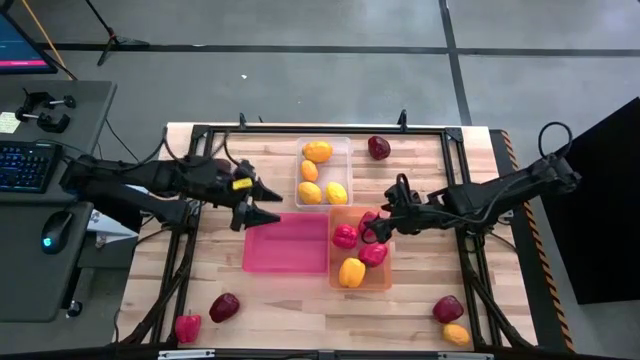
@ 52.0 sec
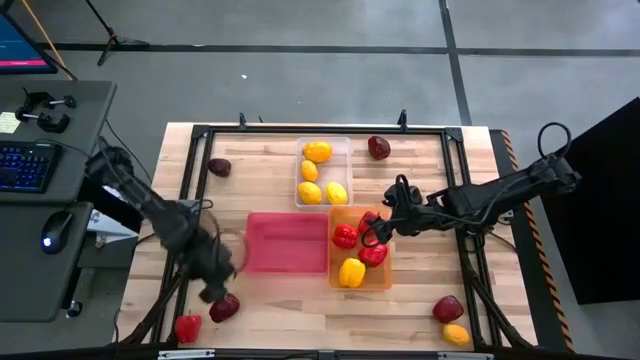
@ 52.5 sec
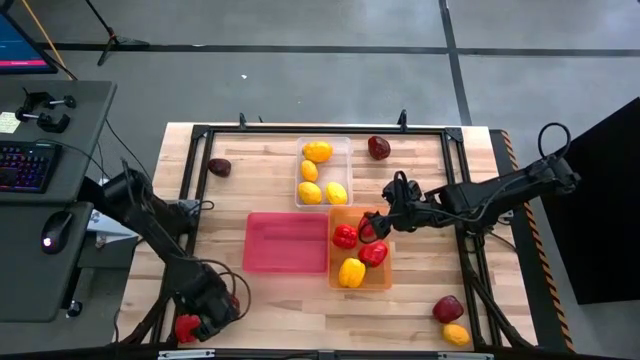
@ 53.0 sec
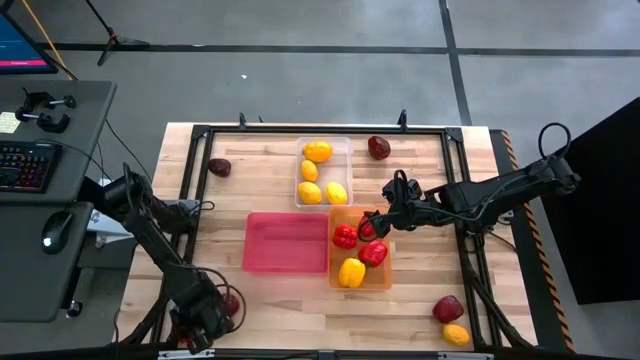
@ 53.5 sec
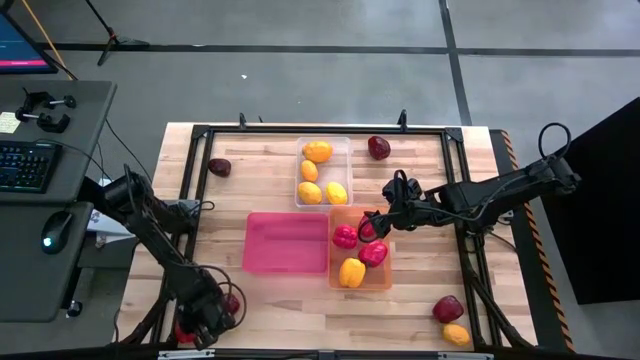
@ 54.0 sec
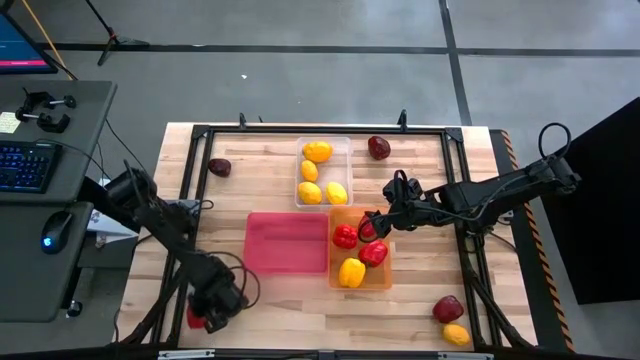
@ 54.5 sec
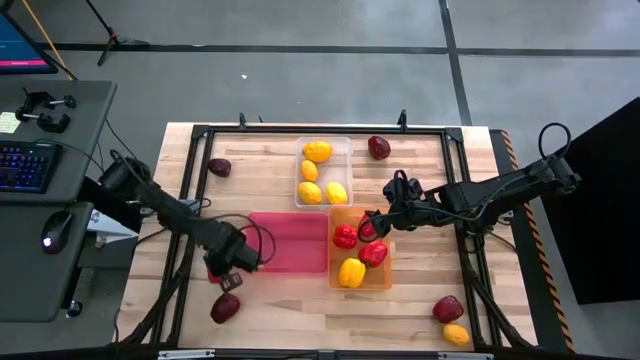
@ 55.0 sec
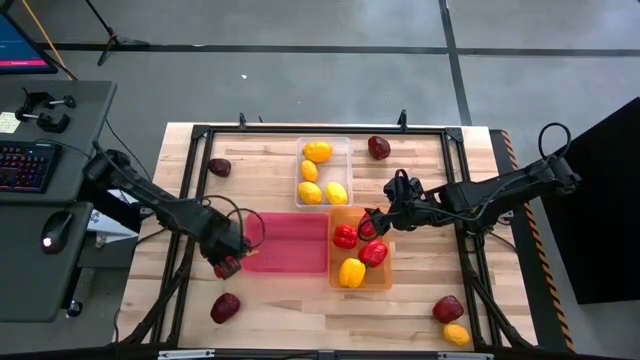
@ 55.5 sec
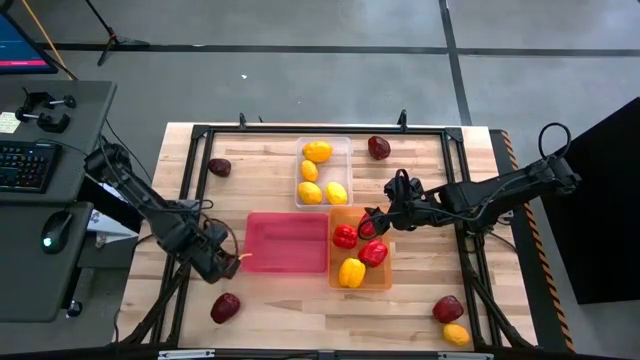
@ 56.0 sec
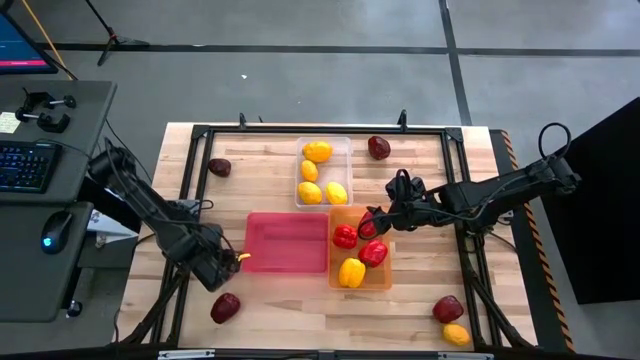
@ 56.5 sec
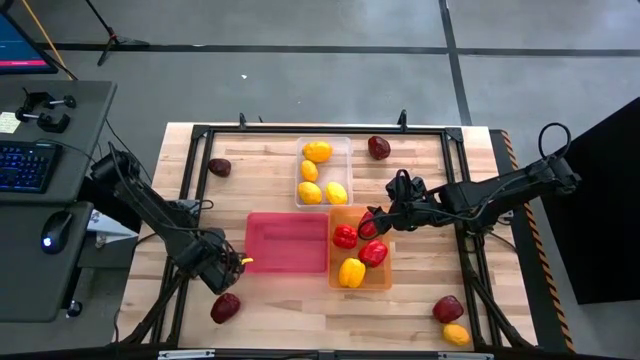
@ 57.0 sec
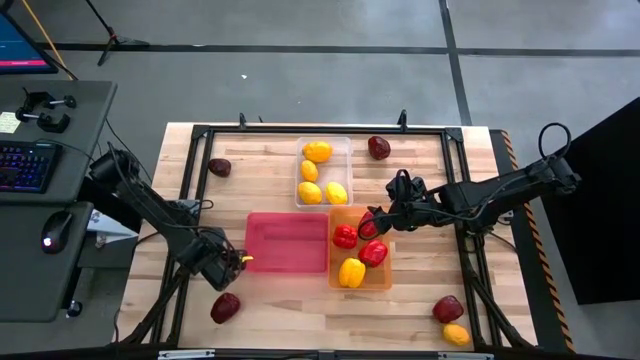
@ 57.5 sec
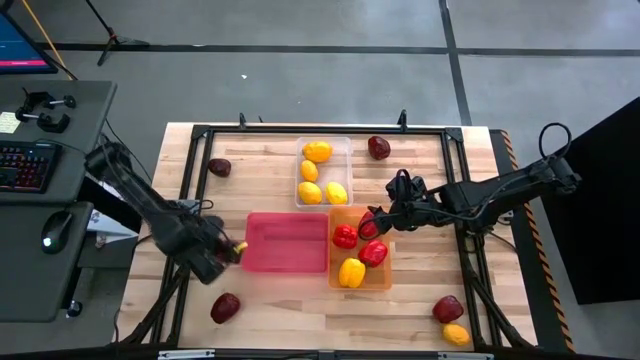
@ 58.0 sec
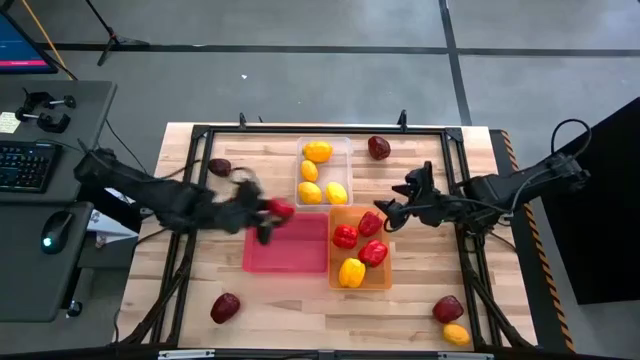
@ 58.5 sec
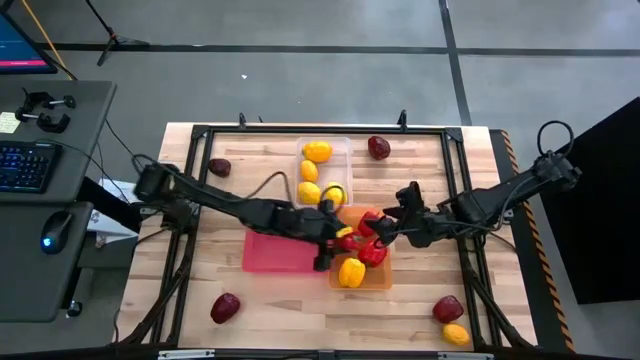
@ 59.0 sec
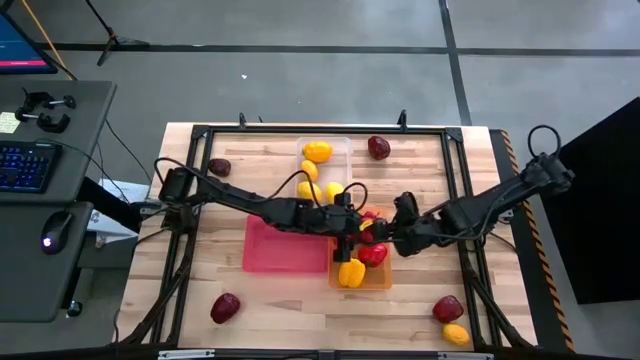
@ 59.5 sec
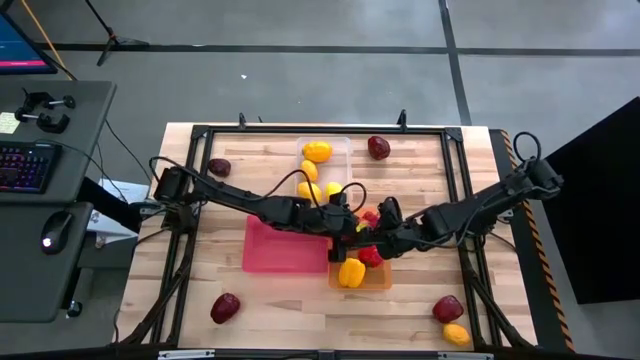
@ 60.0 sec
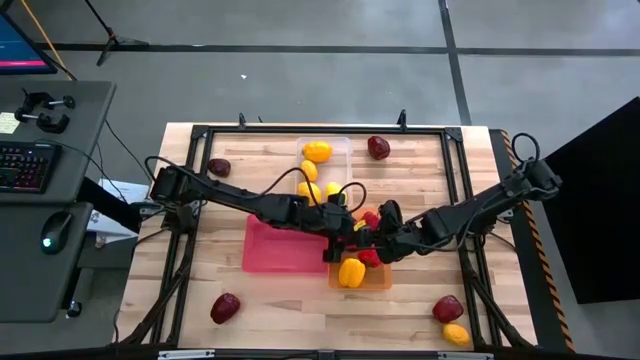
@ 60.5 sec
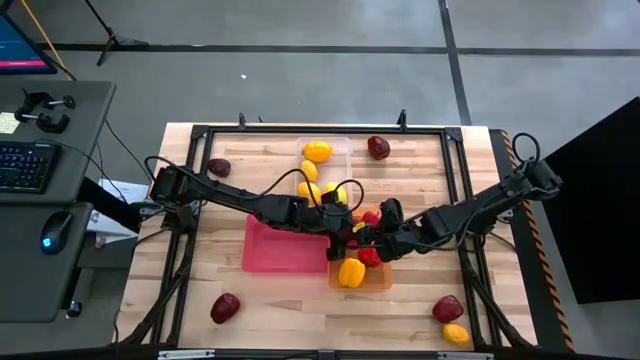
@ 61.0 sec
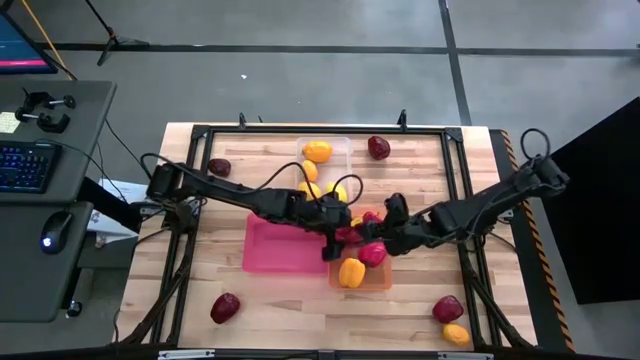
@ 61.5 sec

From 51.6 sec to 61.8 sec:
Task: Sort produce into baskets
Put the red bell pepper into the orange bin

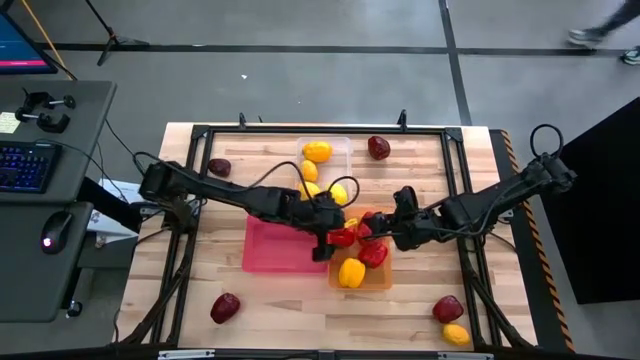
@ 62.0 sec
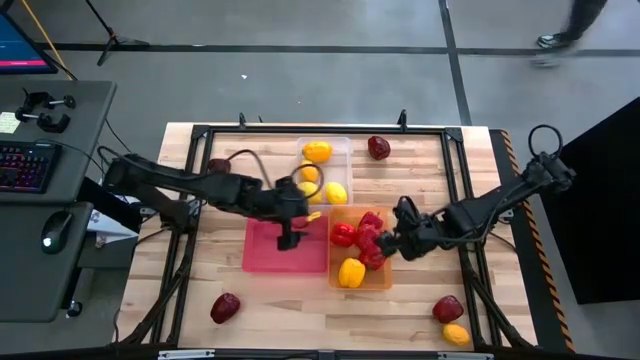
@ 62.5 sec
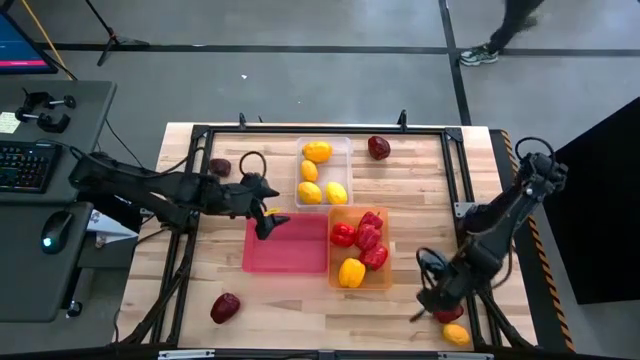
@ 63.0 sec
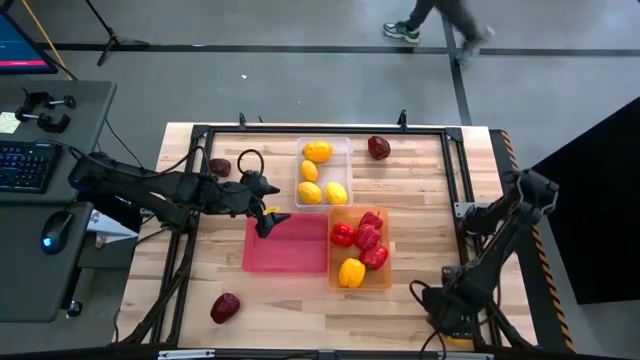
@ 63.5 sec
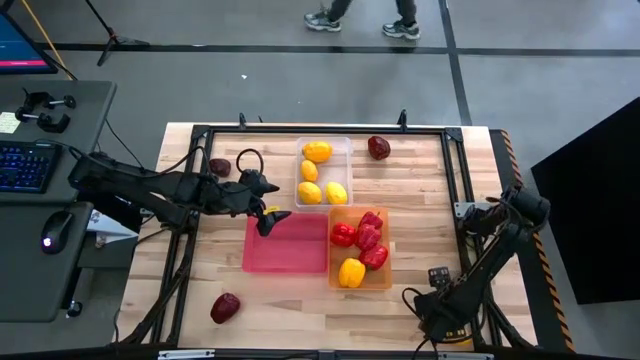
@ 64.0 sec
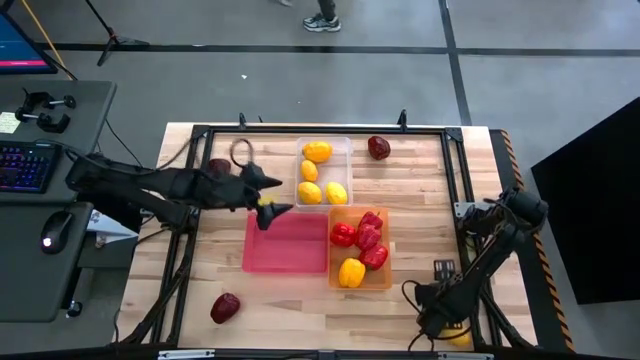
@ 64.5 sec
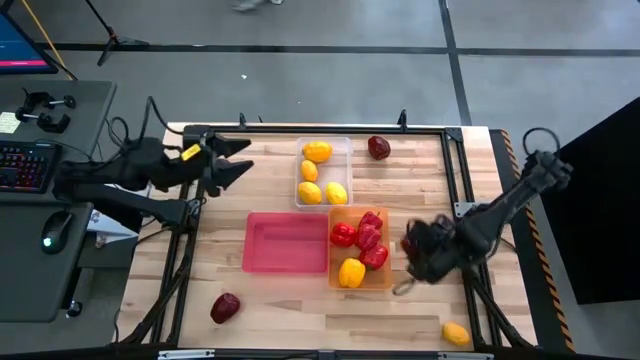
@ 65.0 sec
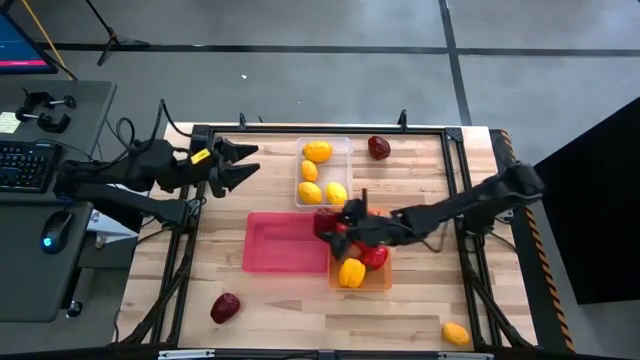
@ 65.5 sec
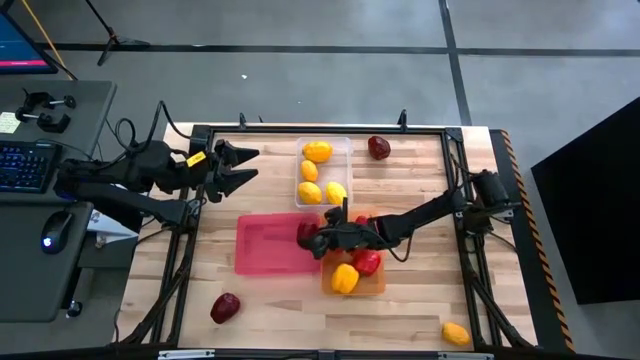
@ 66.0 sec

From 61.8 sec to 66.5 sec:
Put the apple into the red bin

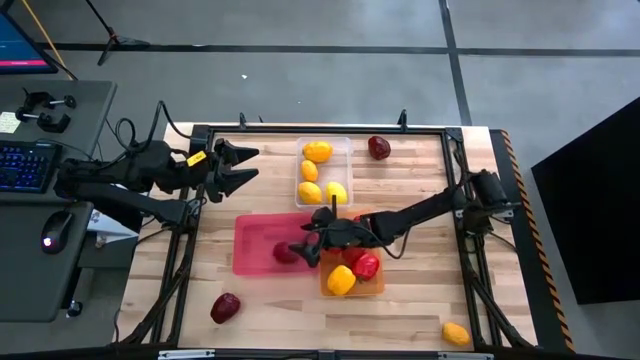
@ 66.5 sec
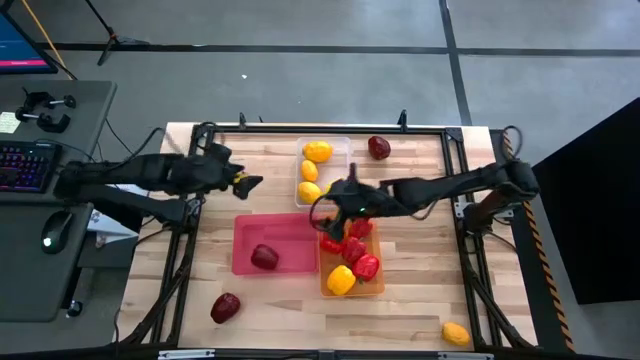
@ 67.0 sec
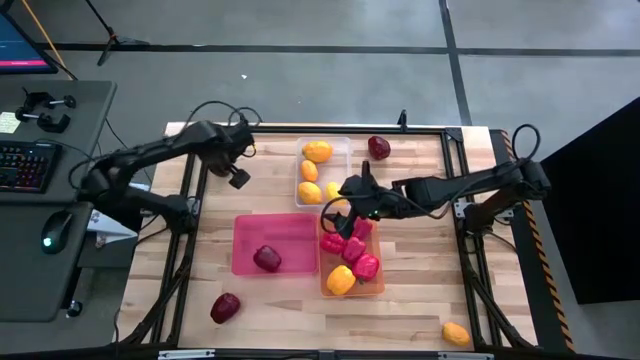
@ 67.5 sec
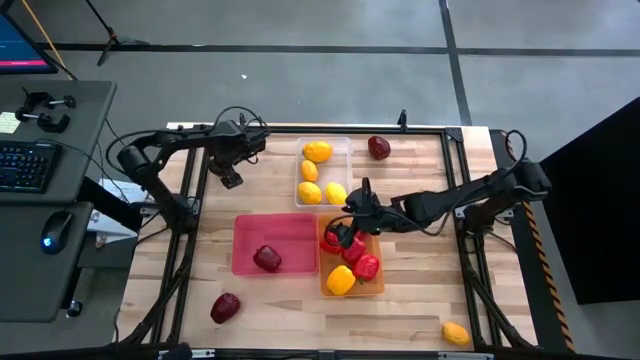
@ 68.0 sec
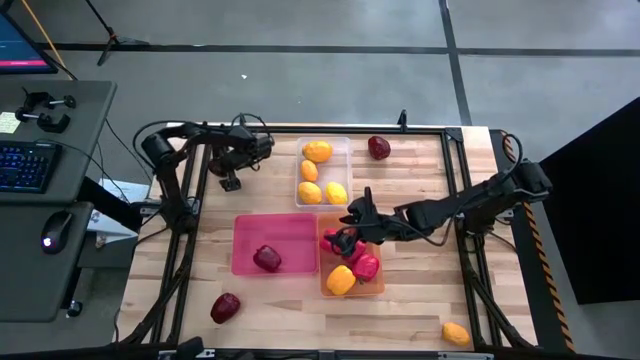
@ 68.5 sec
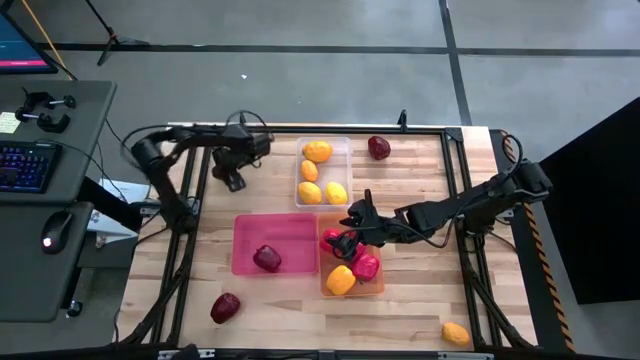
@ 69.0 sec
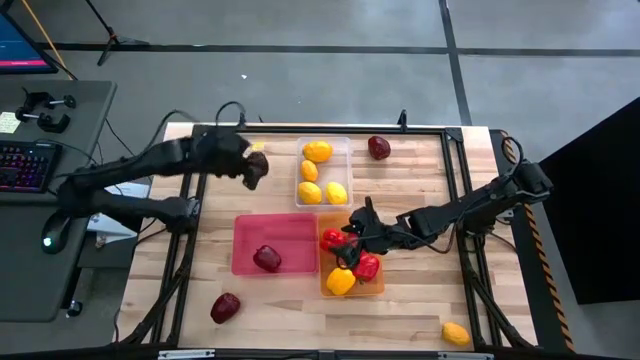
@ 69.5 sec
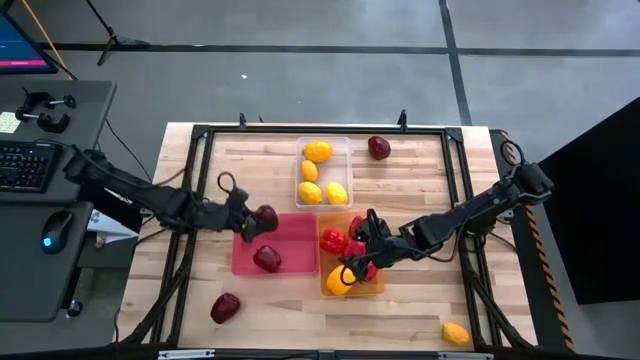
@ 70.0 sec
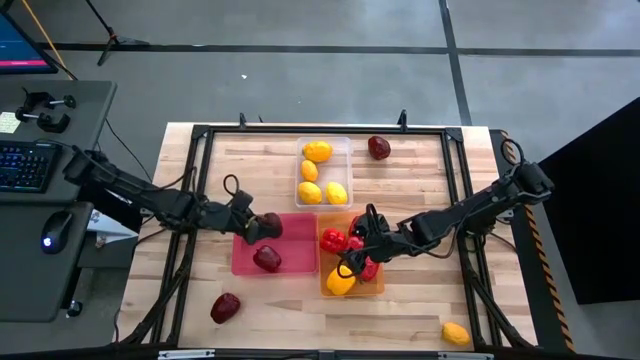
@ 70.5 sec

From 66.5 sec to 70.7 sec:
Put the apple into the red bin

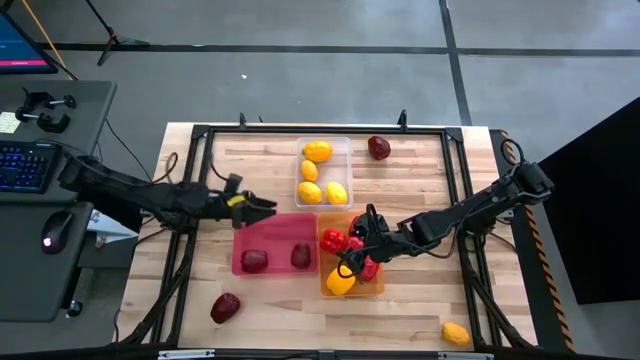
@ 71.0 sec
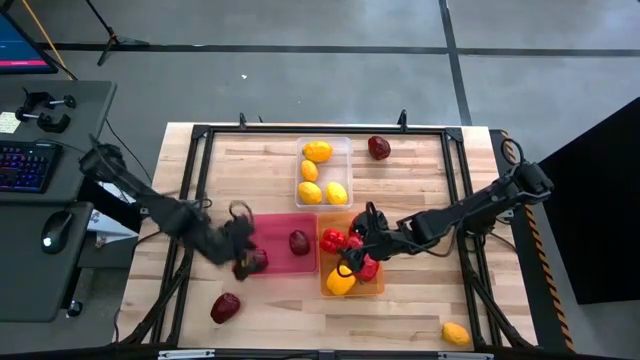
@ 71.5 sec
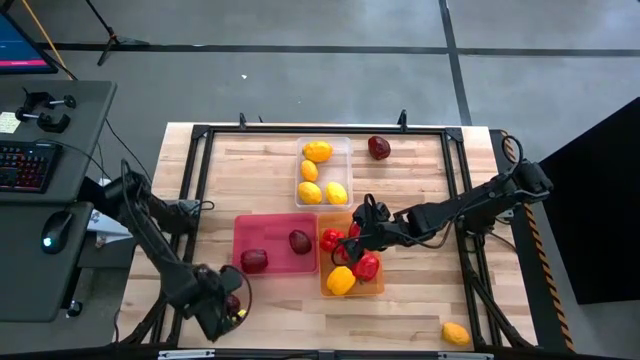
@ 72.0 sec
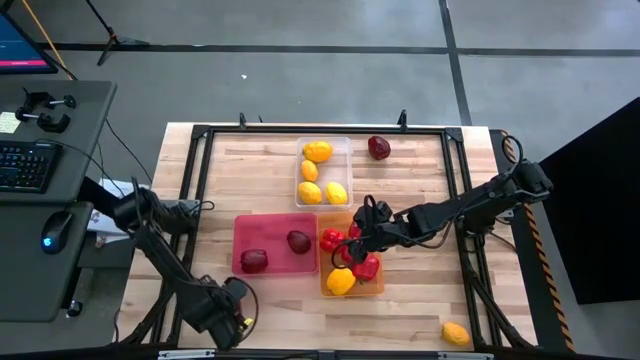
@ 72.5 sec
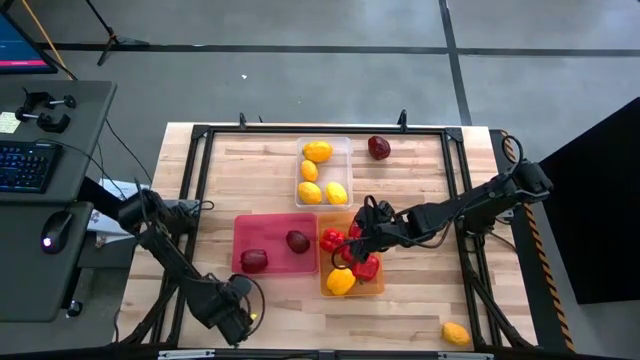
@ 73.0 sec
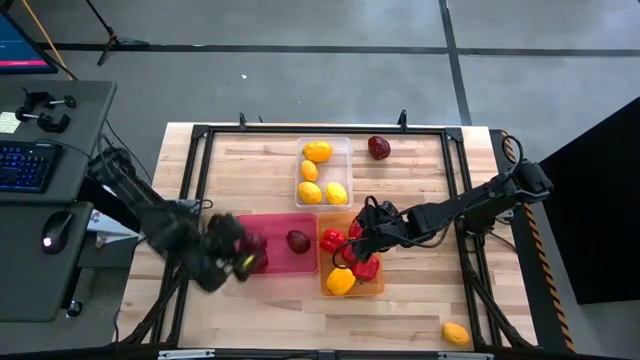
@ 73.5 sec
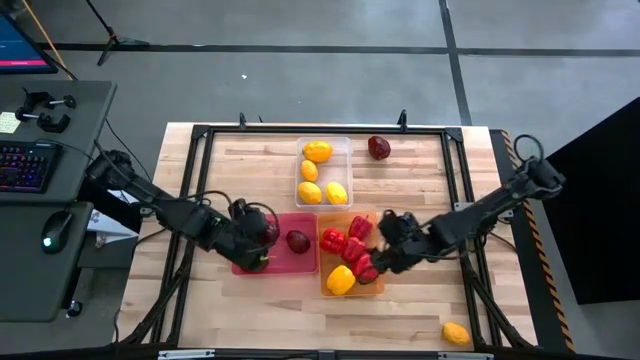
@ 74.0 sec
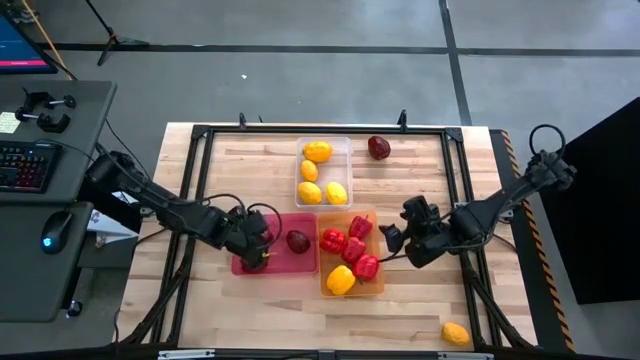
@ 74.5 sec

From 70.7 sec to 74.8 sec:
Put the apple into the red bin
